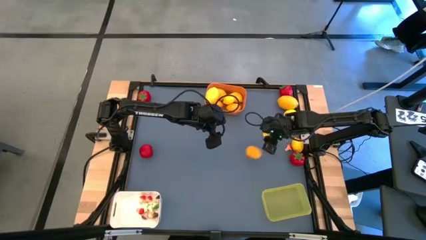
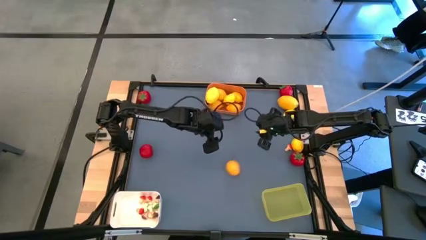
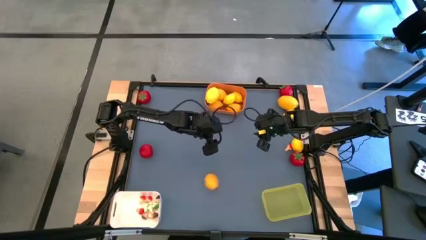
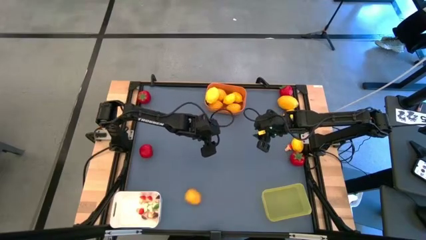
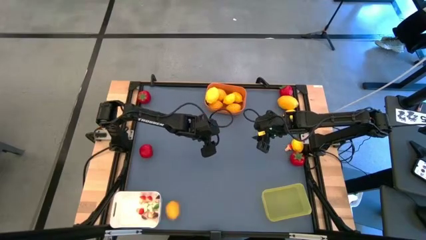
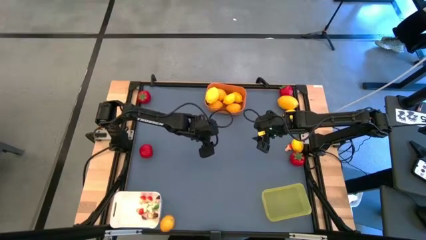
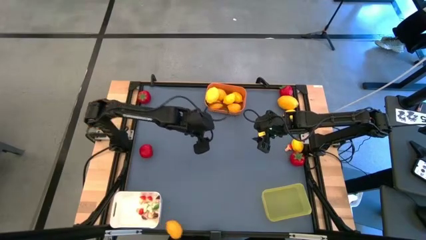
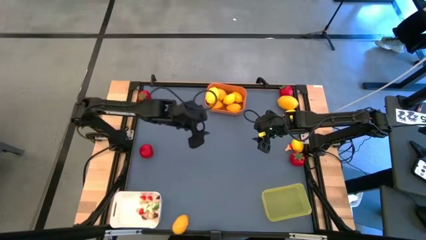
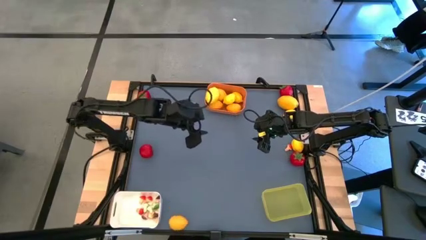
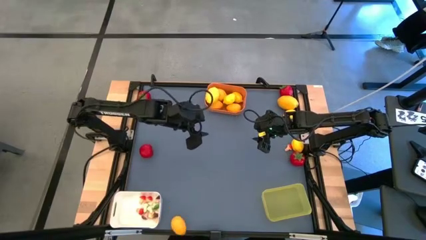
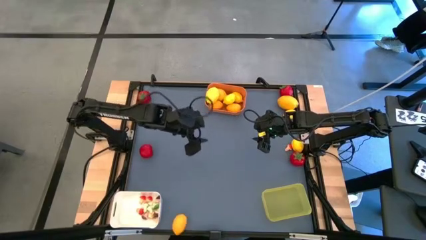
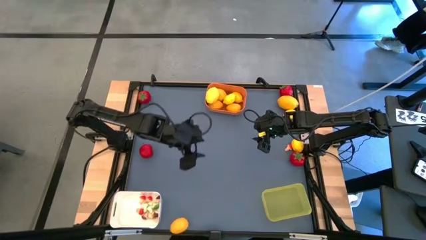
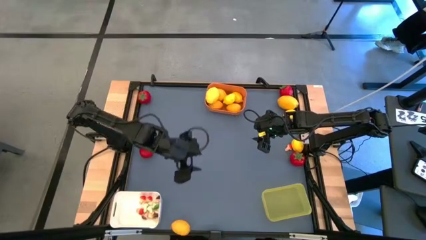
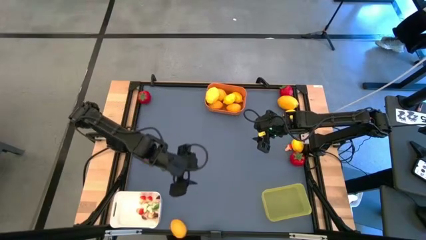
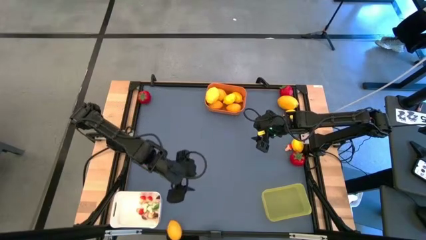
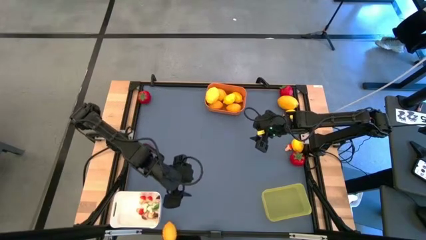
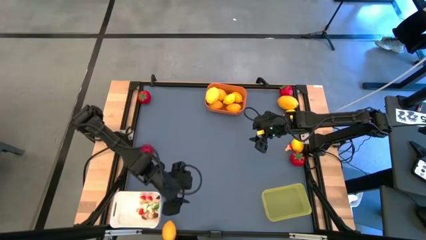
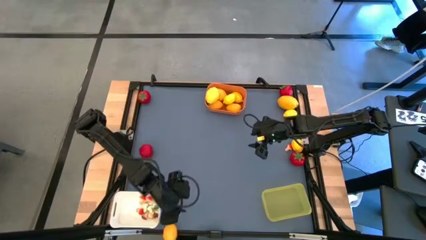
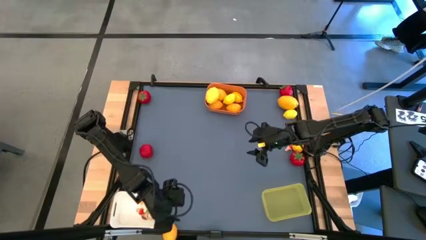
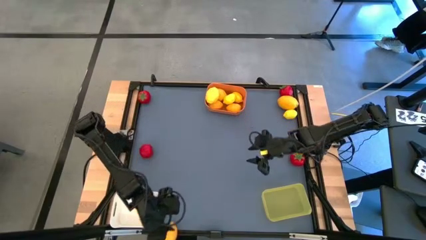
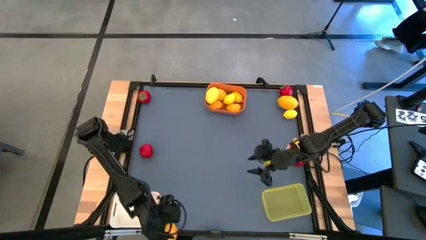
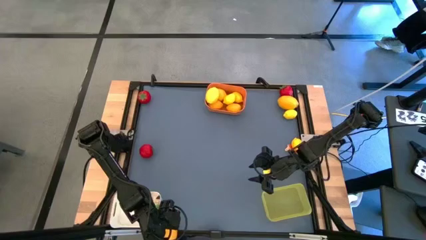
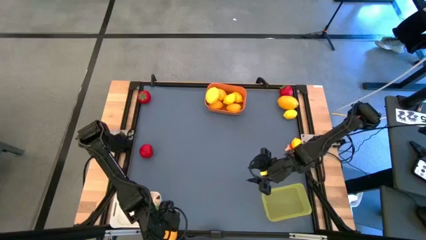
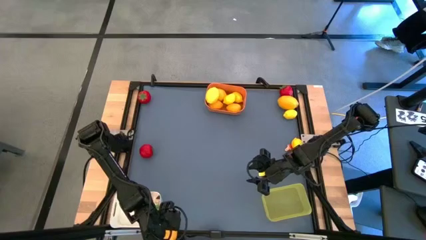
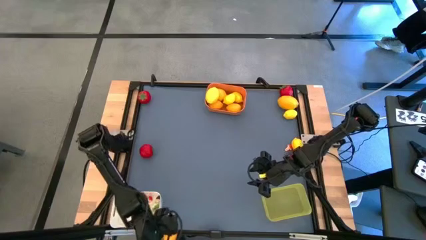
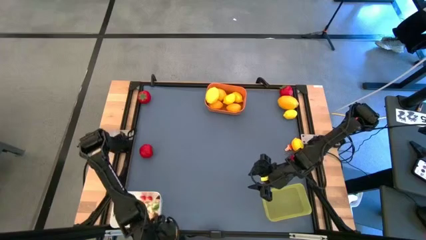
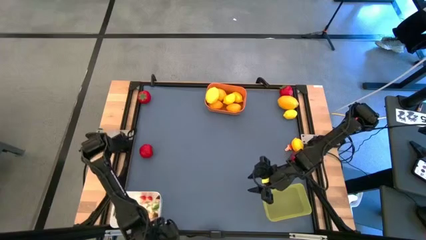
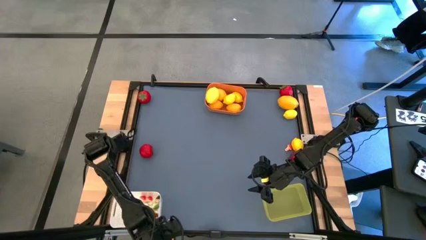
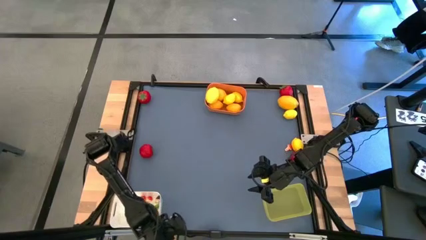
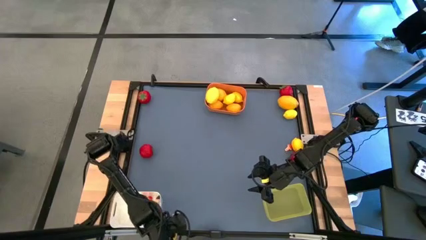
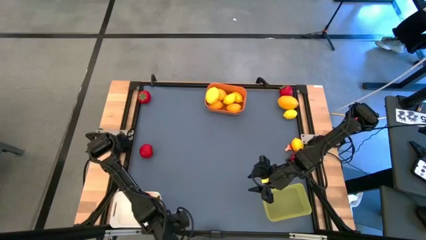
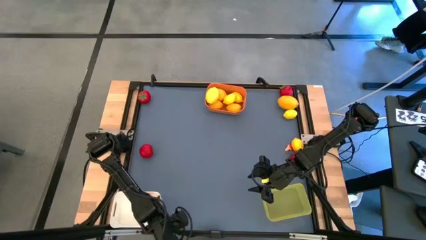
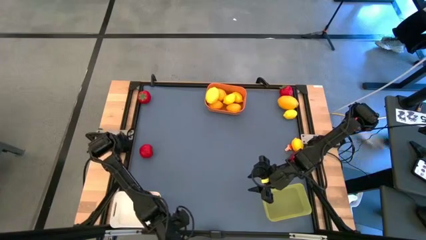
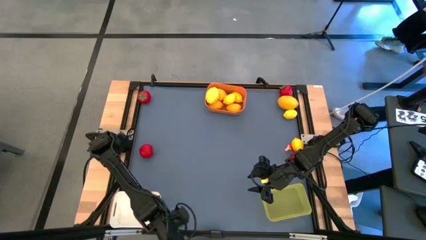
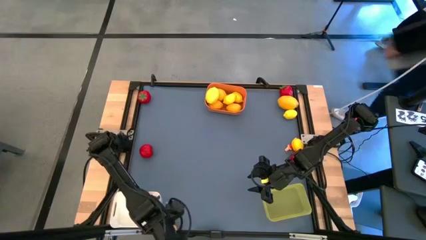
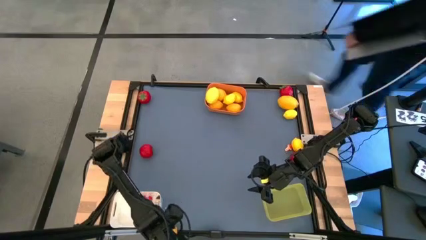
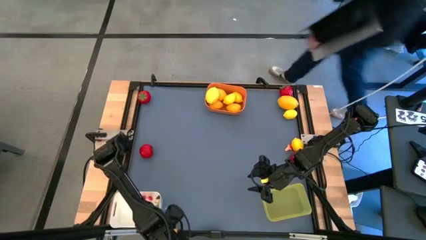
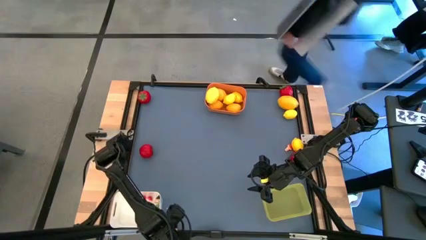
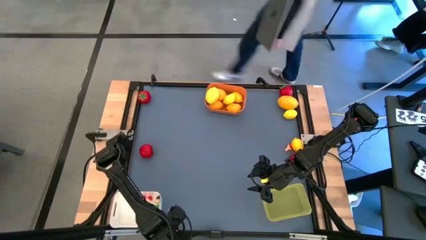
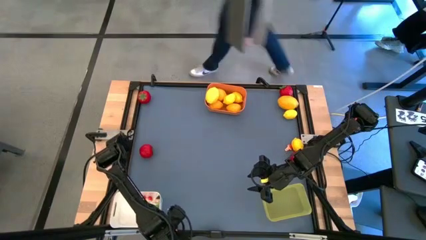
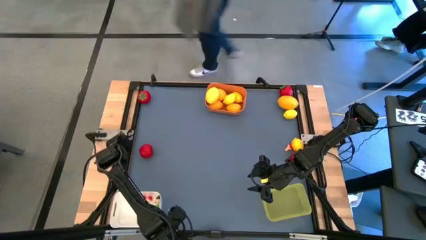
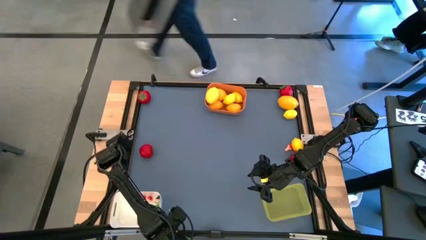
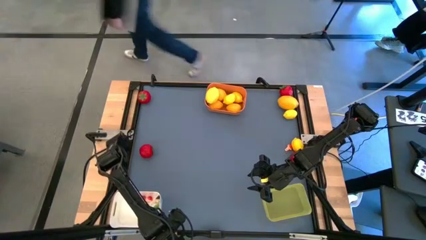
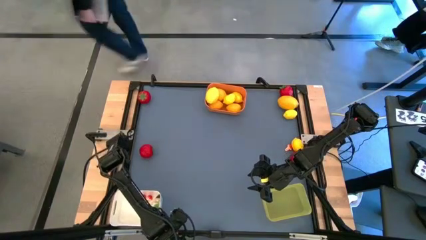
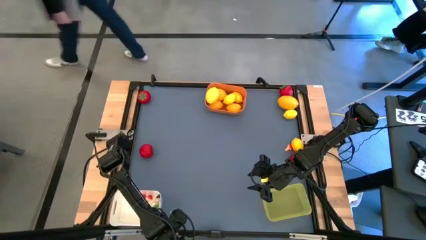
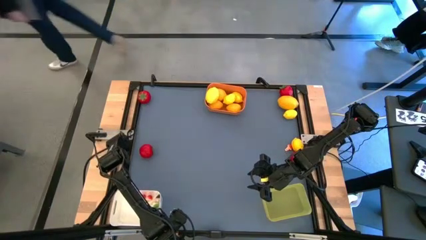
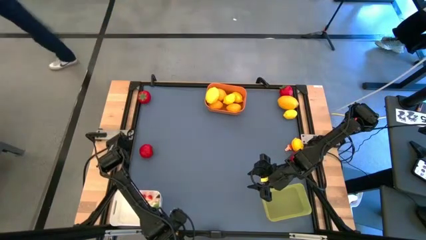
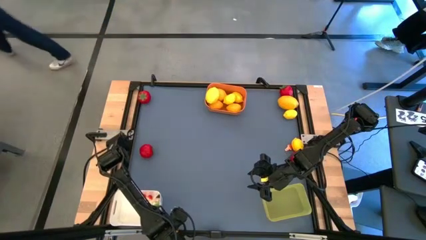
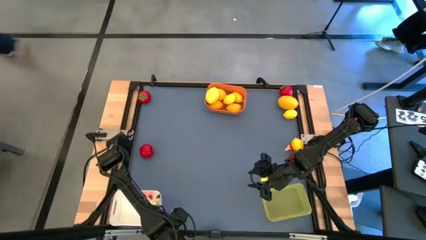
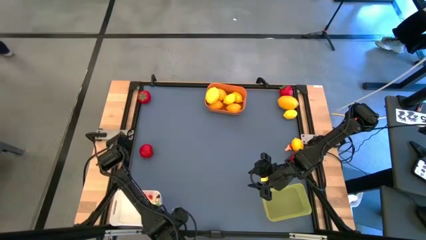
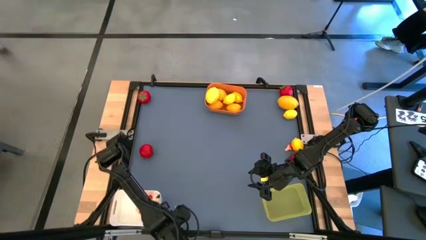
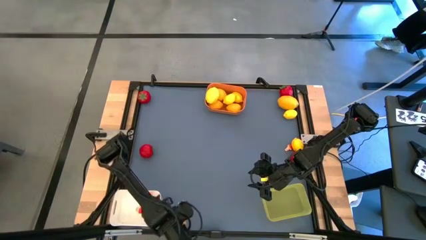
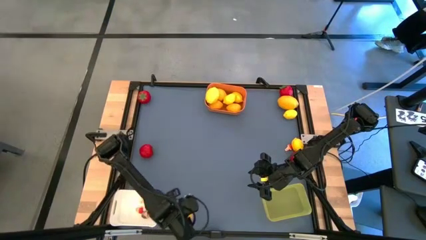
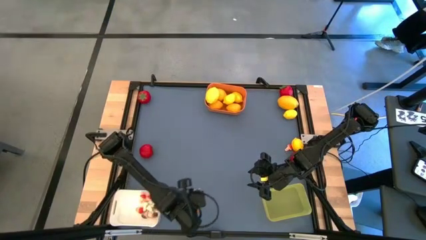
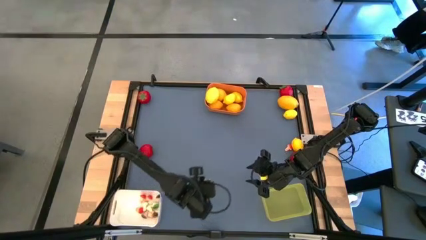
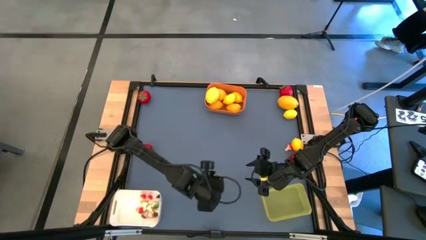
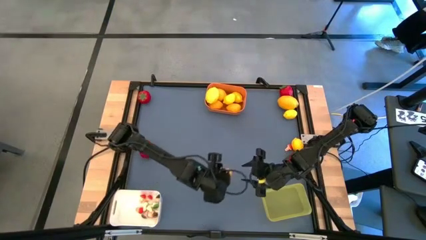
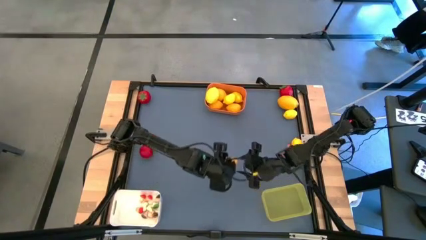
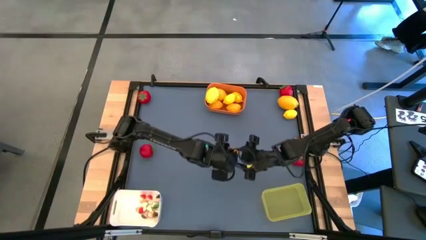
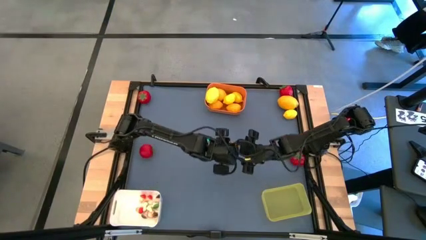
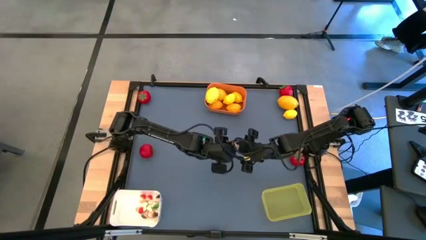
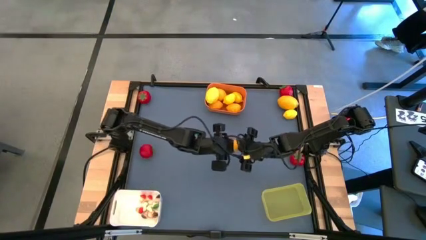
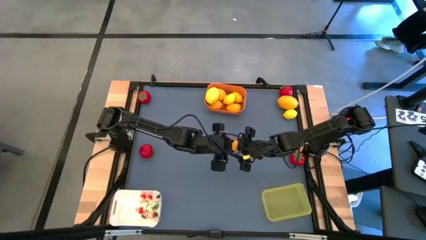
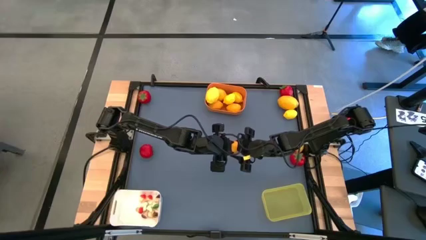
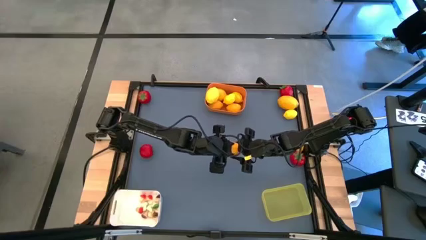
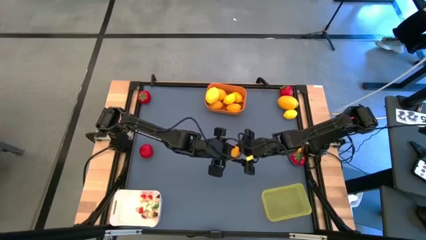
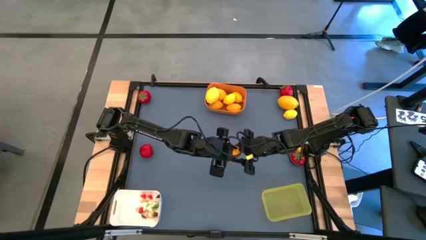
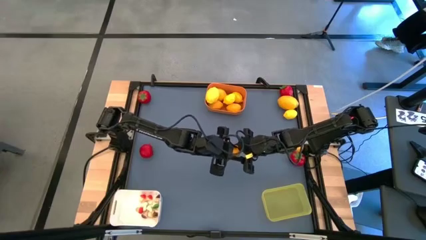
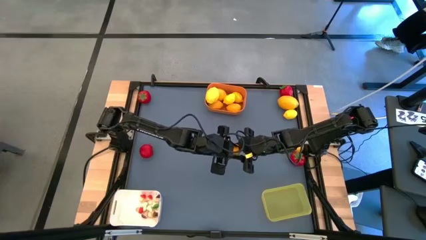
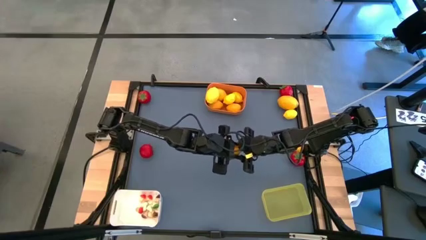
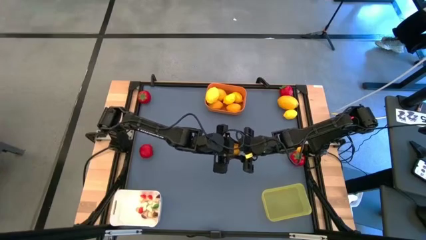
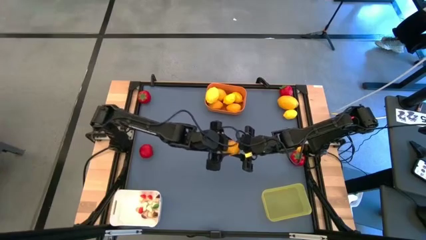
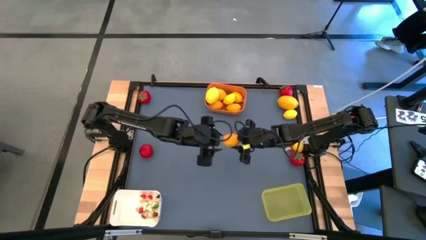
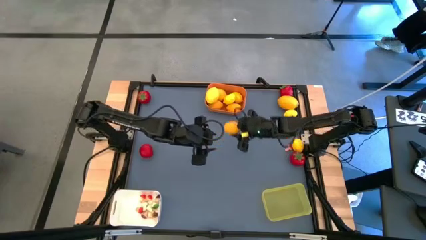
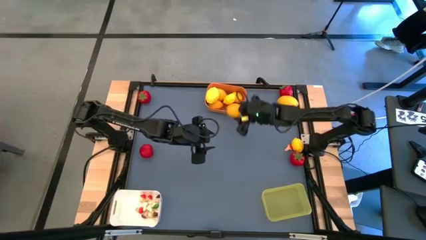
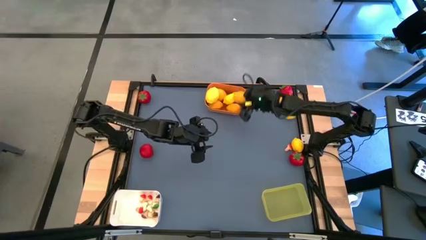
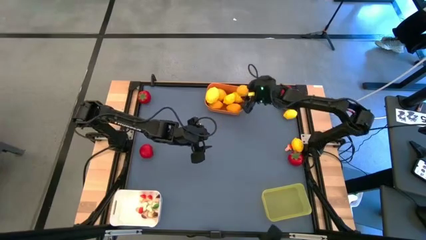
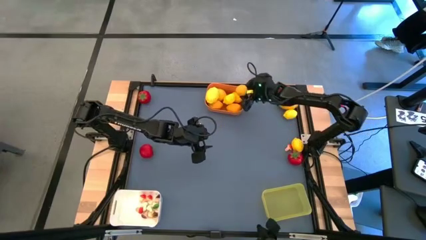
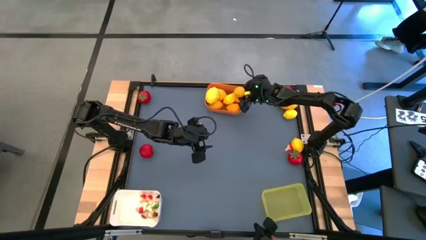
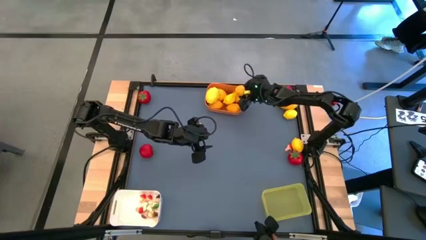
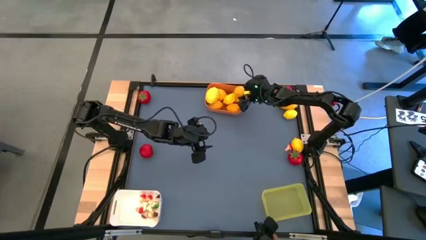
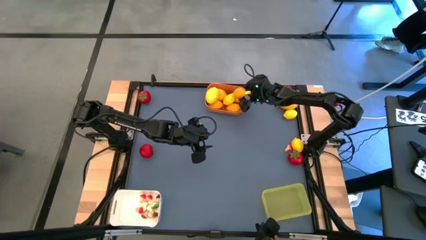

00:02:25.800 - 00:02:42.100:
Task: Sort produce into baskets
Put the yellow lemon into the orange bin
